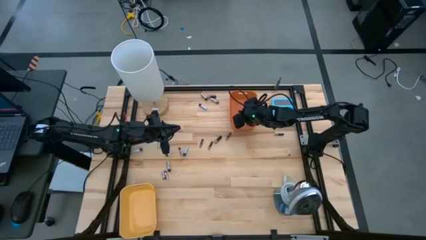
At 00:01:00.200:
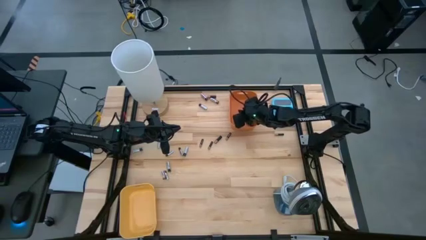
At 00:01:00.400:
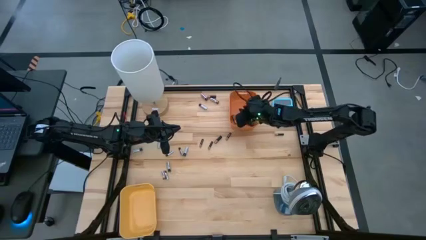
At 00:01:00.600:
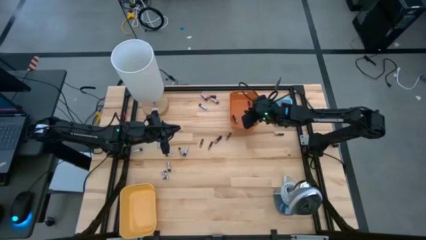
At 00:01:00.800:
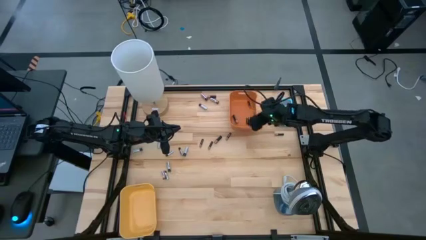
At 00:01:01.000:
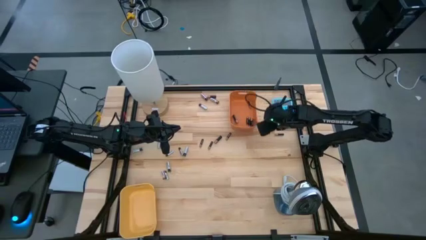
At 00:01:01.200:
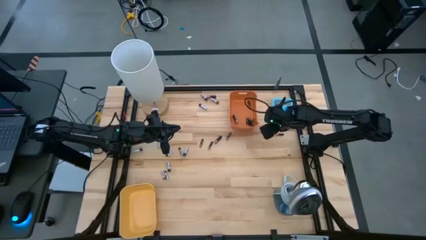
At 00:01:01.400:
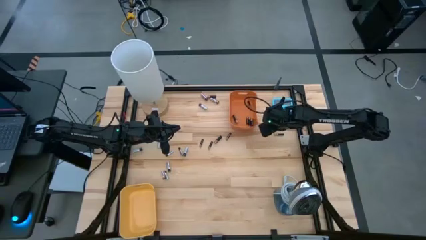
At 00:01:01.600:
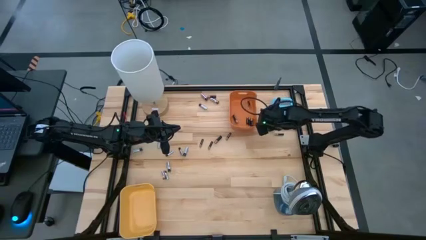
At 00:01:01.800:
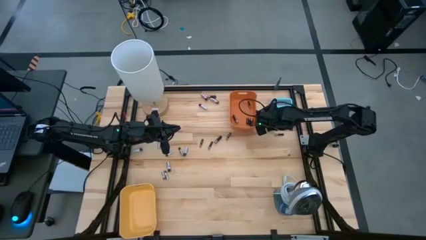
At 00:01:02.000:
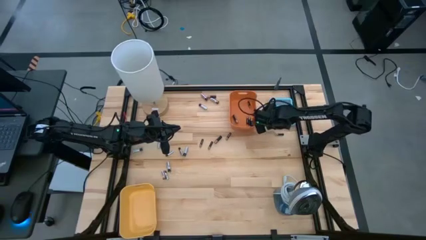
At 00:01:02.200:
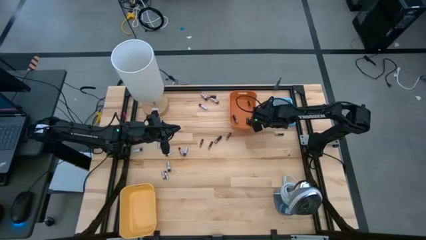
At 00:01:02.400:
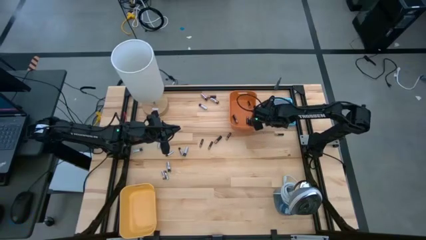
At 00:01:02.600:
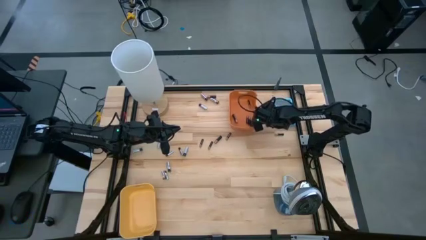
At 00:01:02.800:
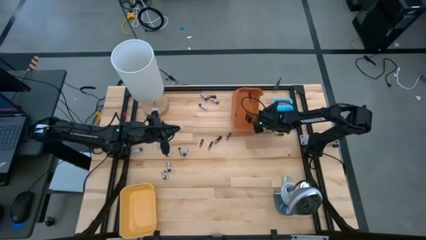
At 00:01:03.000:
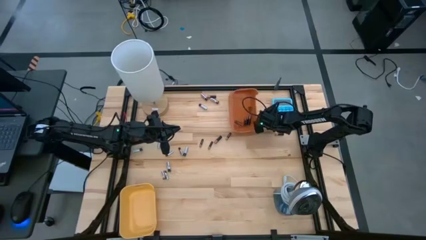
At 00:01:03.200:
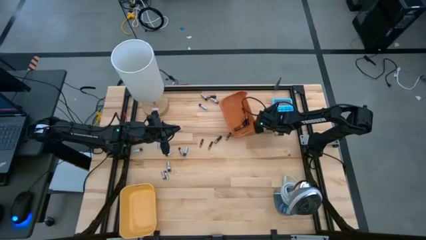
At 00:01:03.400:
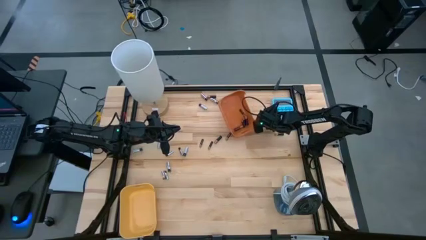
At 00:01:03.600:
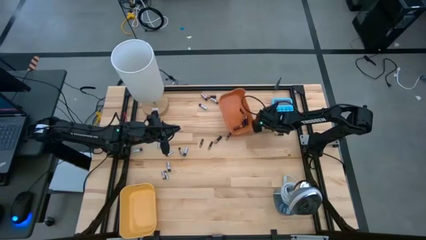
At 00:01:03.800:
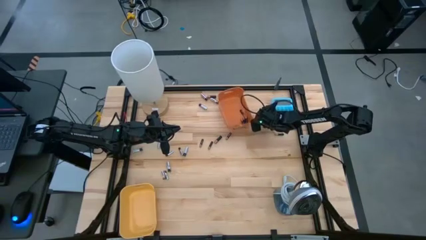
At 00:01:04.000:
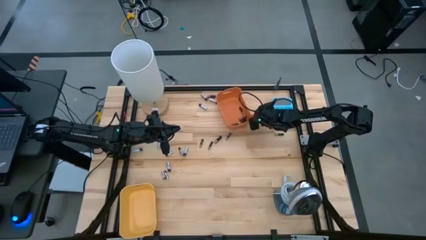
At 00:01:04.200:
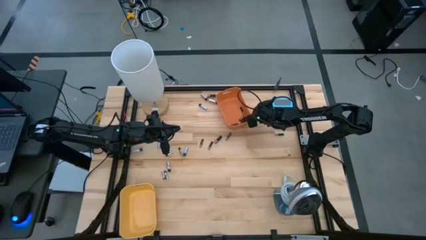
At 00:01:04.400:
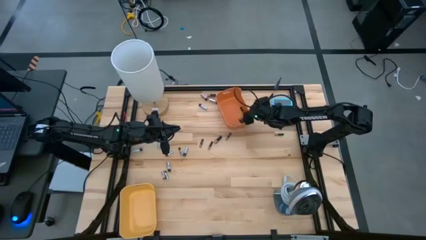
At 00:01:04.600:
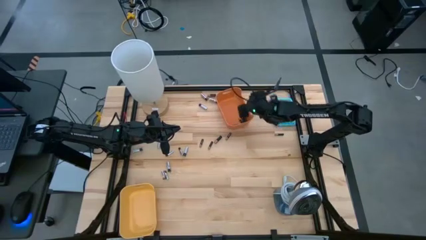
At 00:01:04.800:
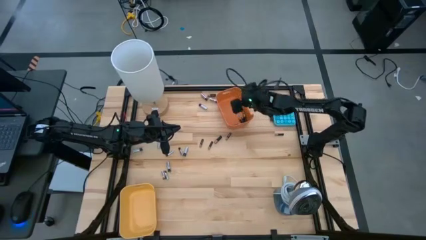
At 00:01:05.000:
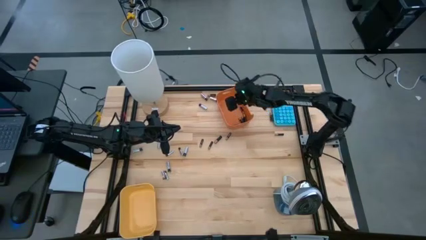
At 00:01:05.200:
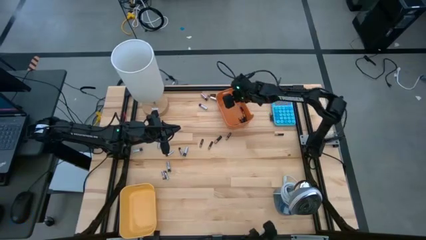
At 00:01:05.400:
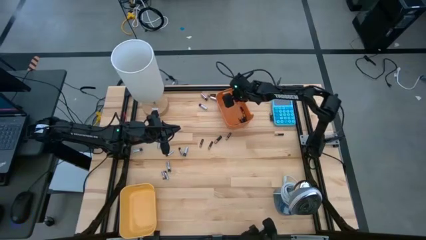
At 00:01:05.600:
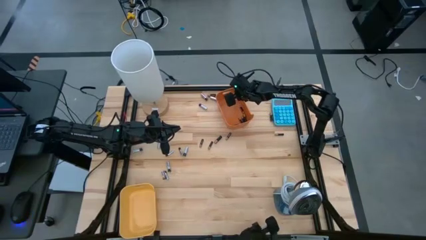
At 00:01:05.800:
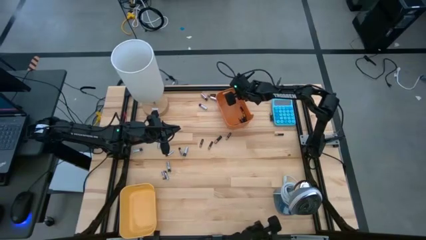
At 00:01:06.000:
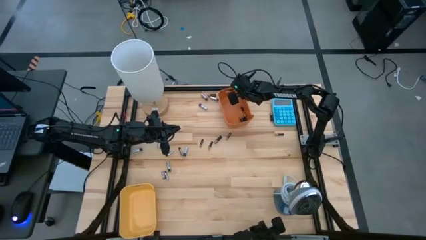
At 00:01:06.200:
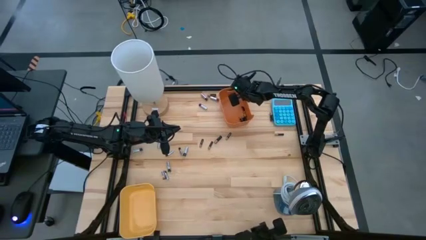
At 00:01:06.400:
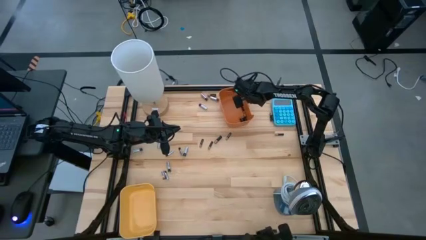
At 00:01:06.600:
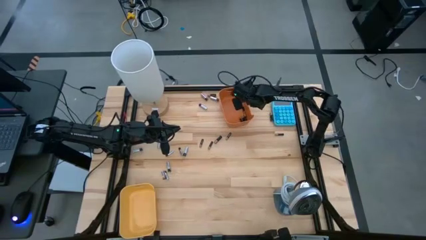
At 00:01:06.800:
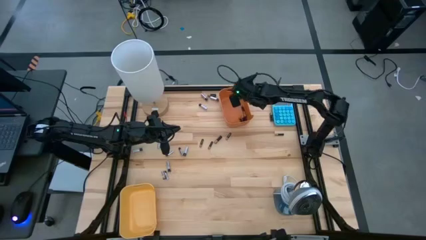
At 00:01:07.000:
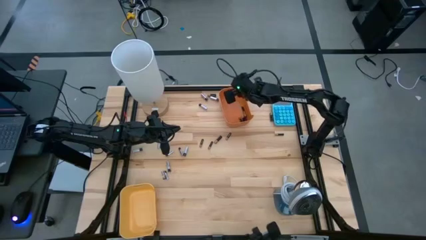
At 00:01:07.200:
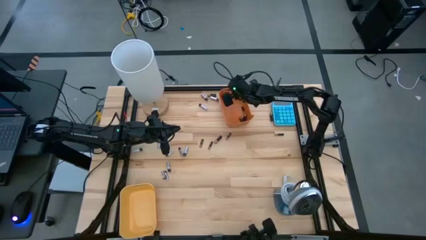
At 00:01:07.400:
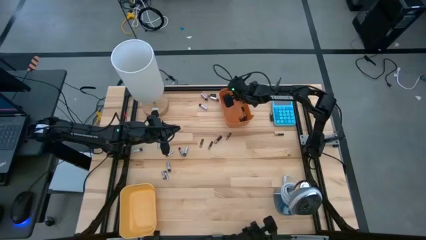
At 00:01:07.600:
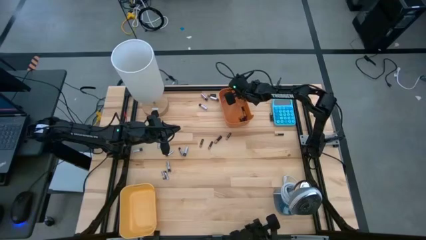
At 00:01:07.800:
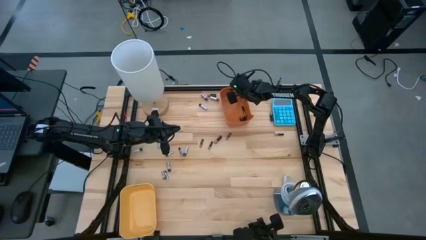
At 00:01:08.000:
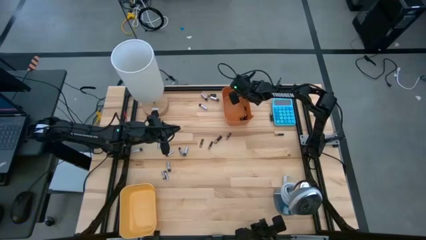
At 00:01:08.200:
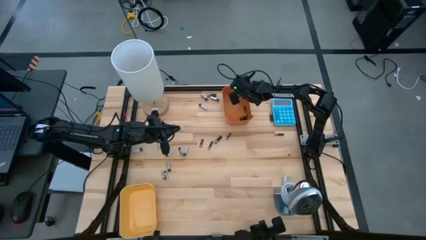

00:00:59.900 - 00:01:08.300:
Task: Sort batteries
Adjust the orange bin

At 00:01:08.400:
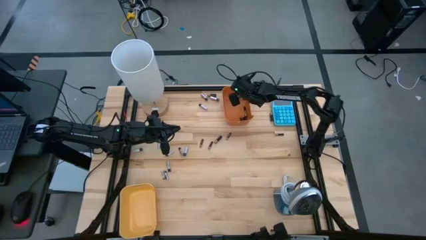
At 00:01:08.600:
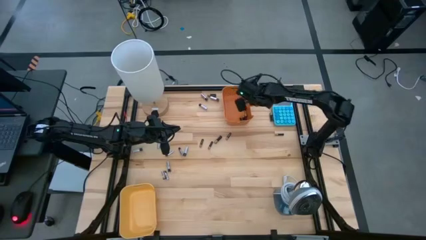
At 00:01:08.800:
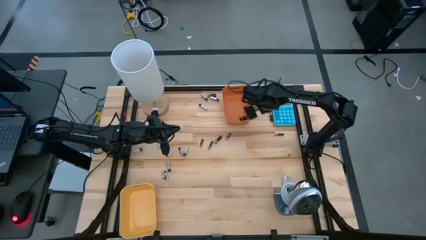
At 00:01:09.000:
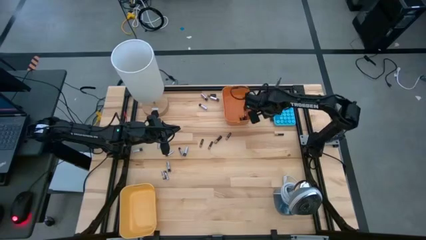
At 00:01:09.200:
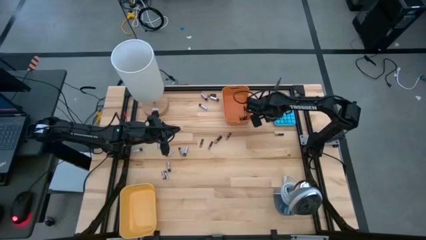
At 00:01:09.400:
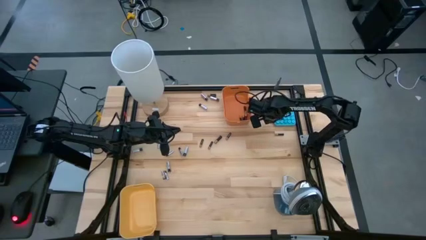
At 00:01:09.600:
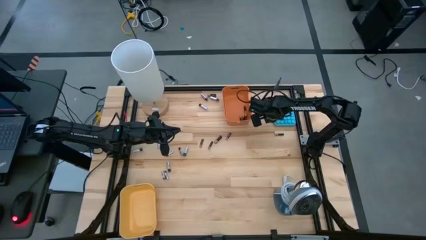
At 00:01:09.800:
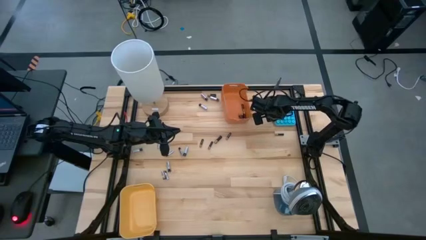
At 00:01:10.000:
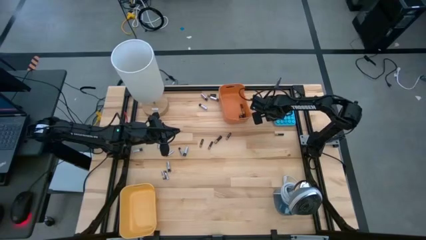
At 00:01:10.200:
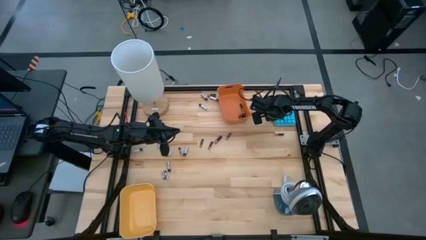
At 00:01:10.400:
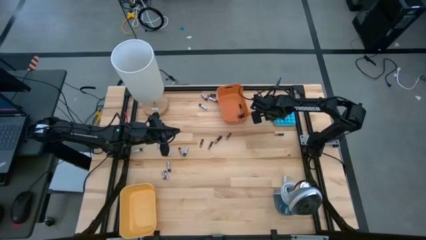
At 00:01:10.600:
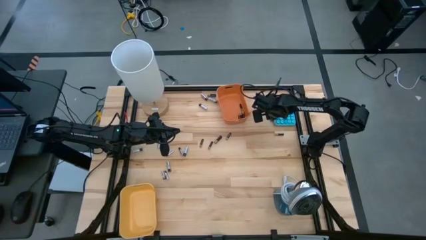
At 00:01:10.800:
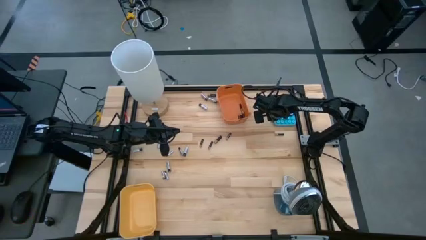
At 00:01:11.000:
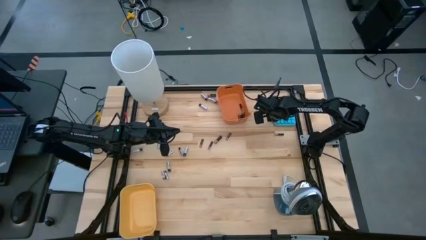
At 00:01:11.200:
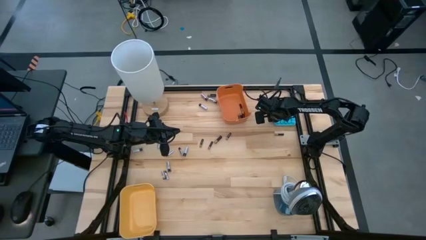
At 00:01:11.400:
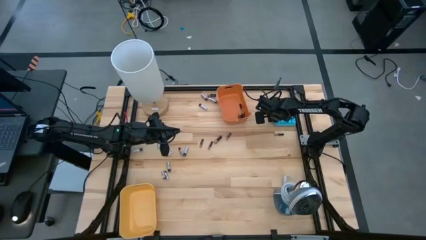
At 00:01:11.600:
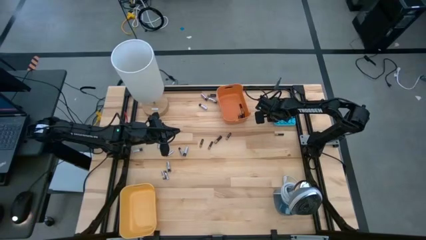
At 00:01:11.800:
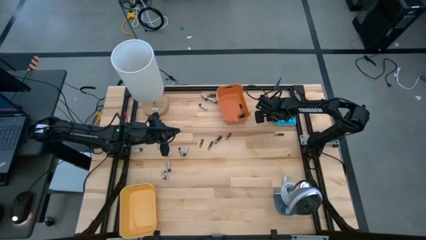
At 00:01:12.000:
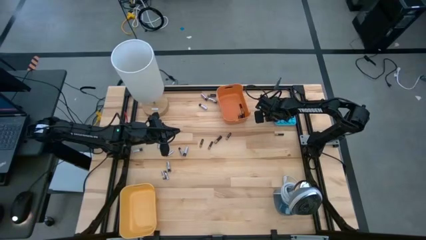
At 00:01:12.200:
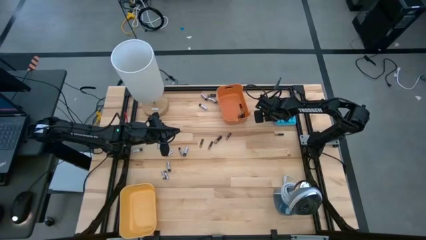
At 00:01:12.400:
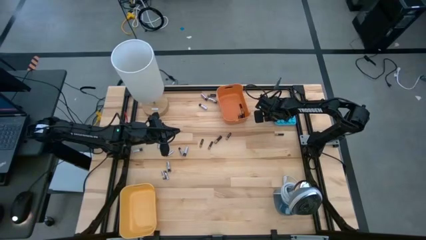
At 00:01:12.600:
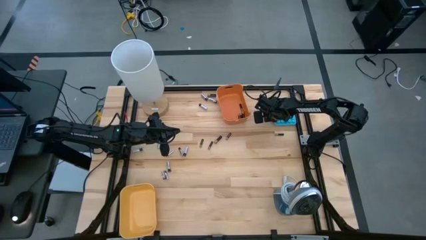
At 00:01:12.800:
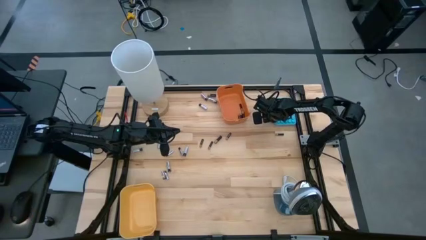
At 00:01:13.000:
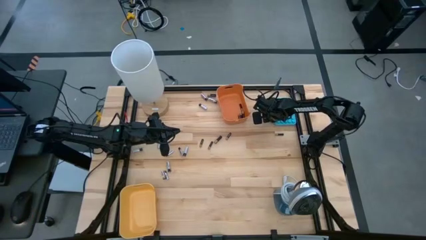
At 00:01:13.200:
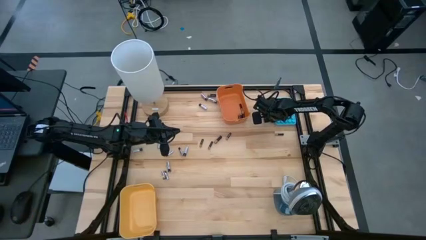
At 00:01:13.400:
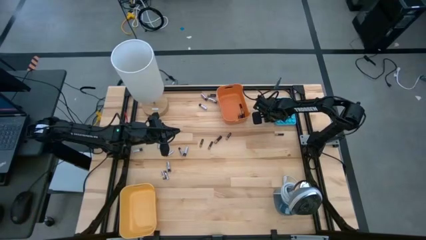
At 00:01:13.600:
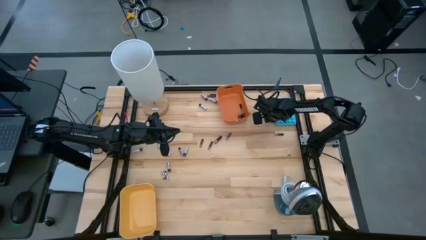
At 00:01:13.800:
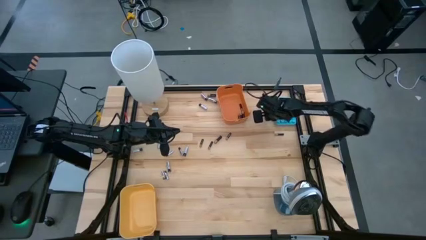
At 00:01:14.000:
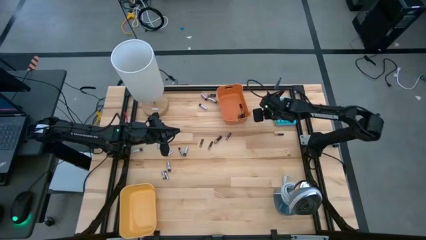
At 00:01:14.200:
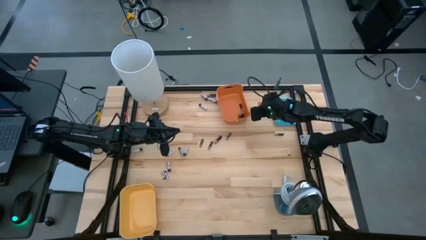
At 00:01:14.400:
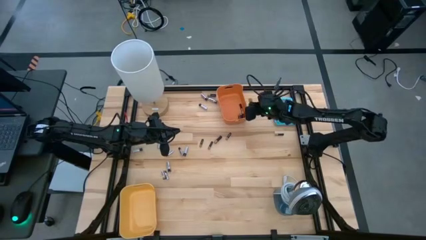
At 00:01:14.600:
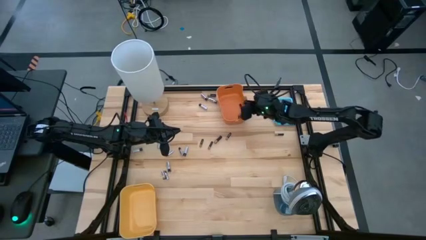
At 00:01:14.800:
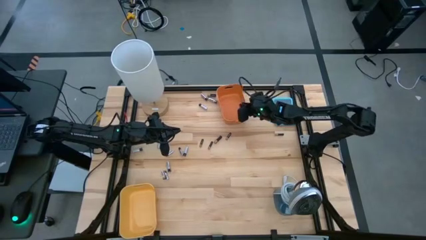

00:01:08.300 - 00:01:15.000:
Put the black battery into the orange bin
